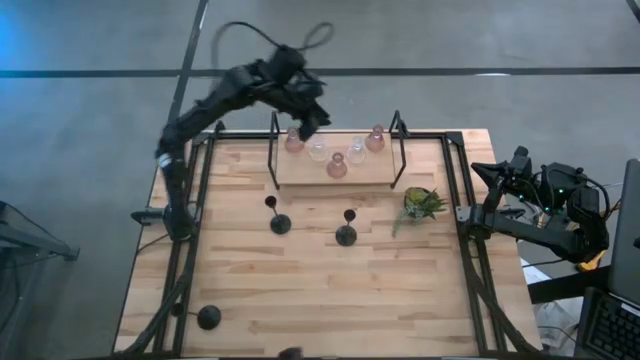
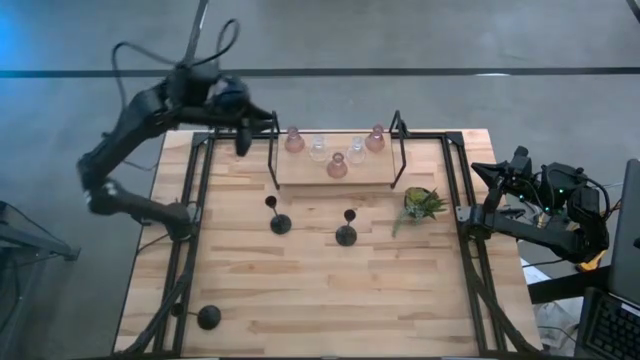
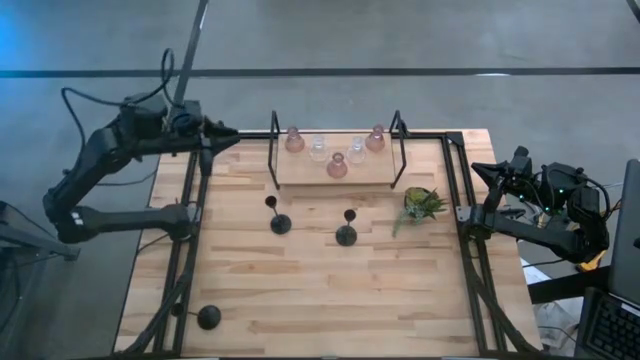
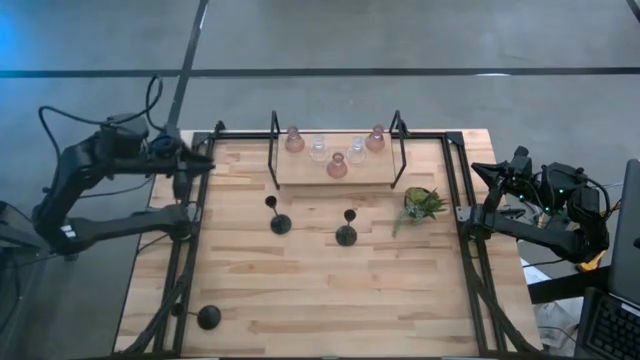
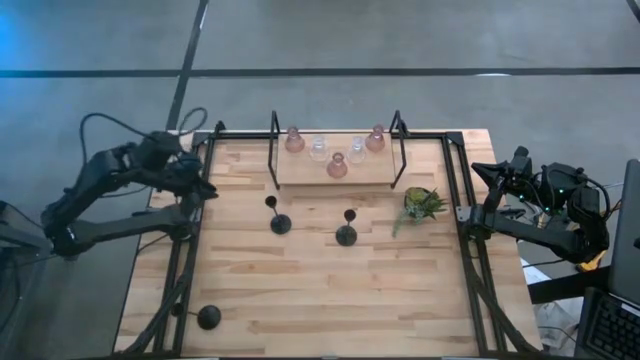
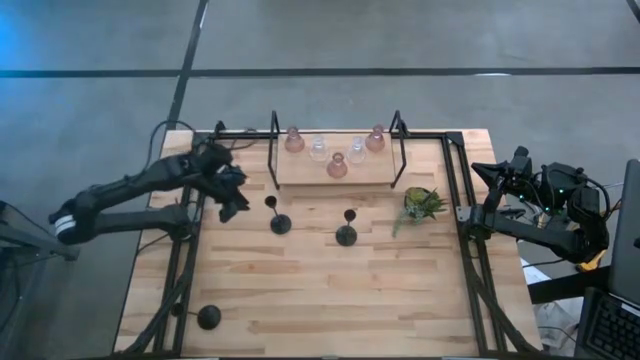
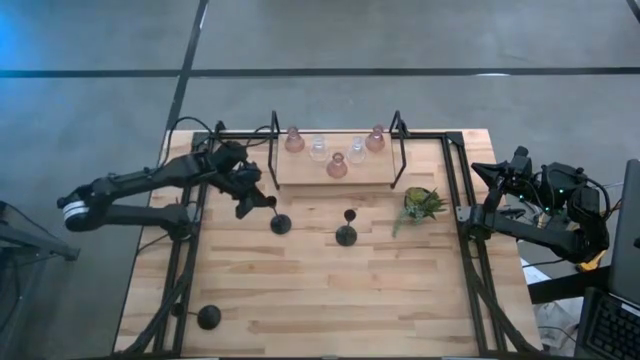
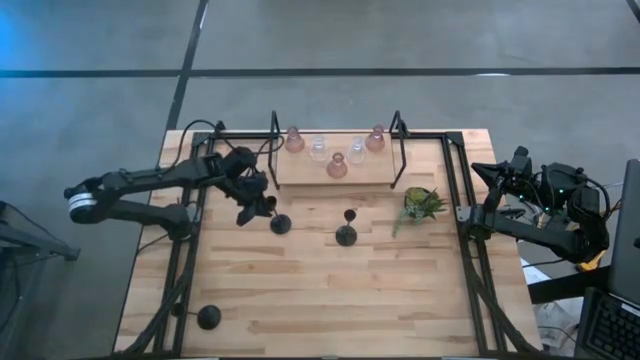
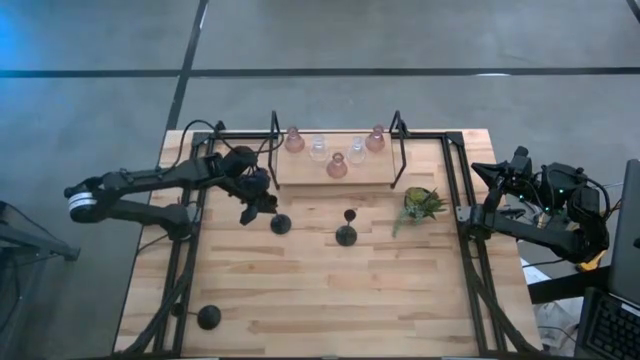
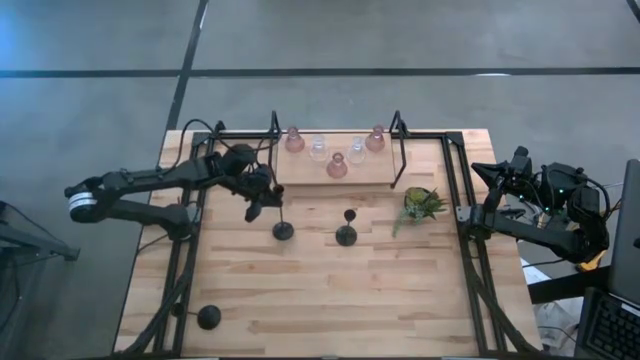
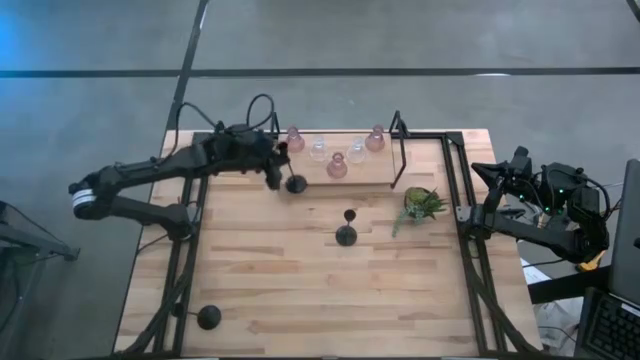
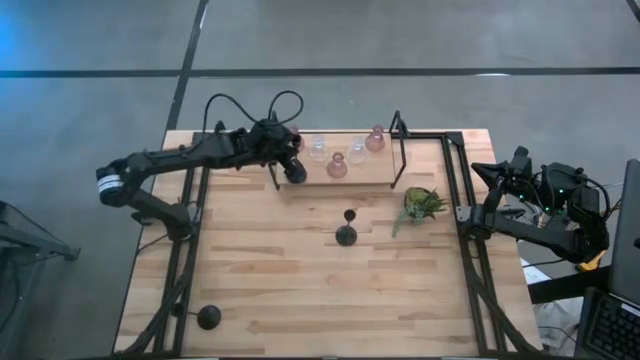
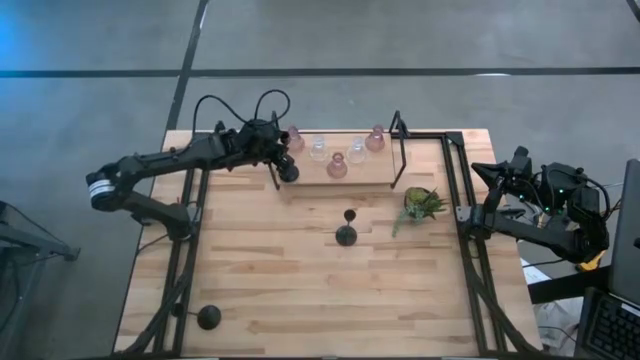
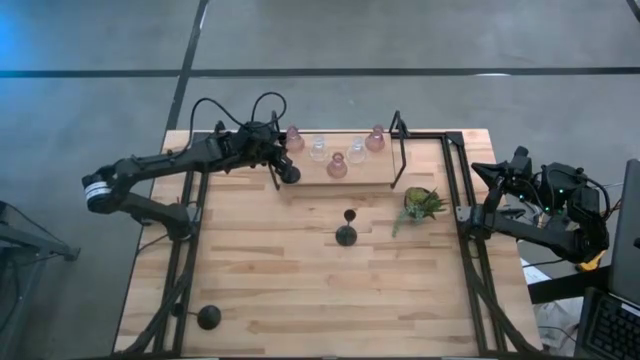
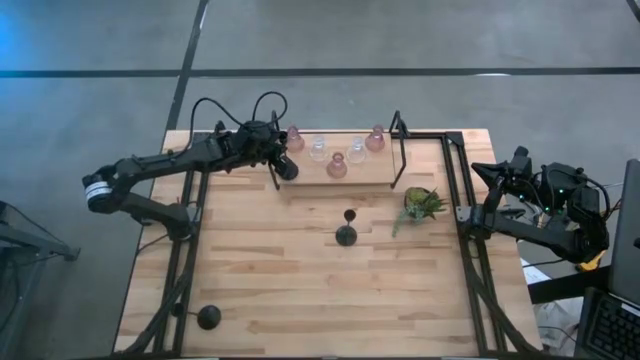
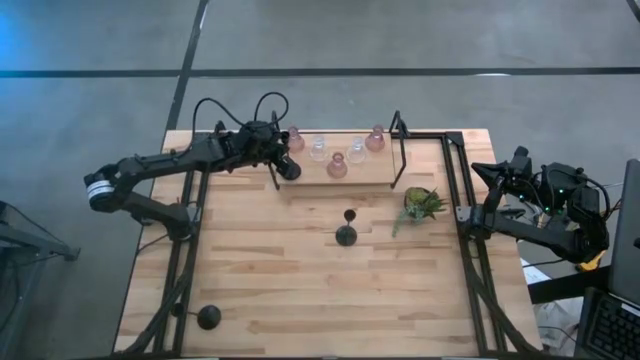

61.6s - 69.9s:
Task: Pick & Place candle stick holders
Put the top left black candle holder on the shelf aligned with the other pink candle holder

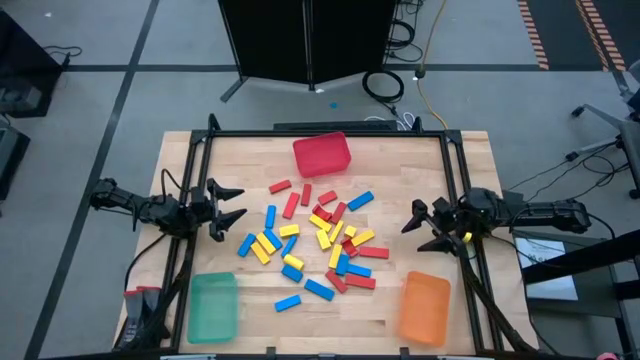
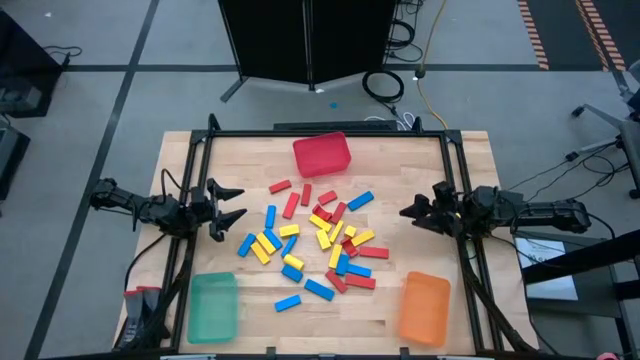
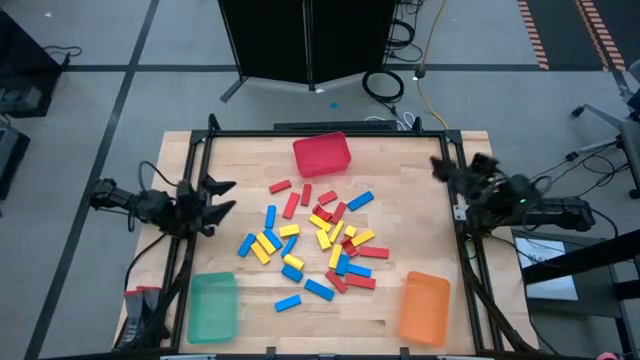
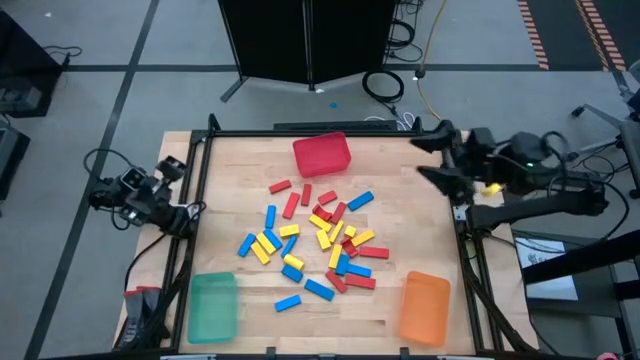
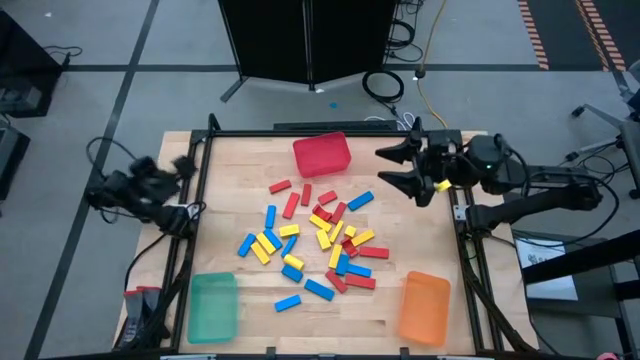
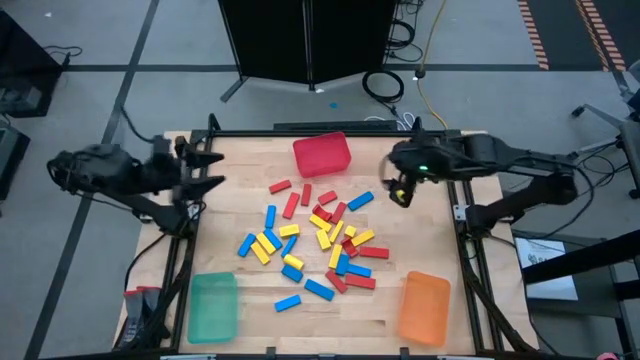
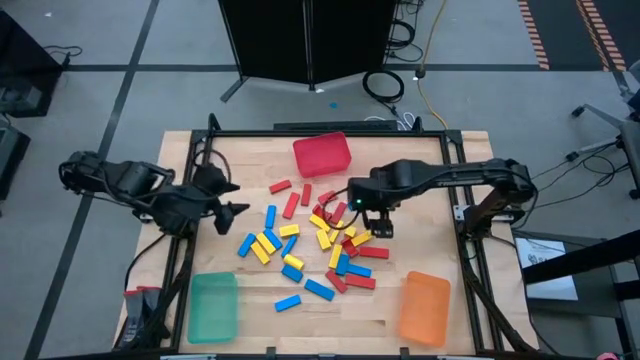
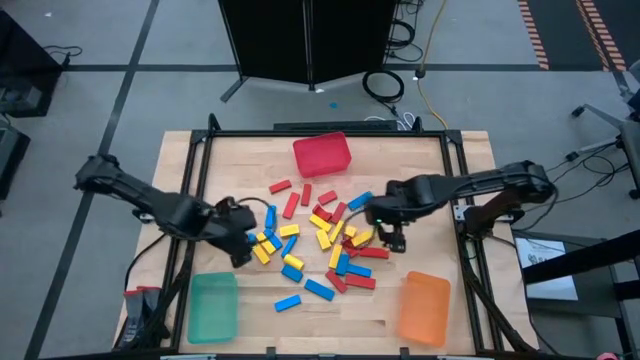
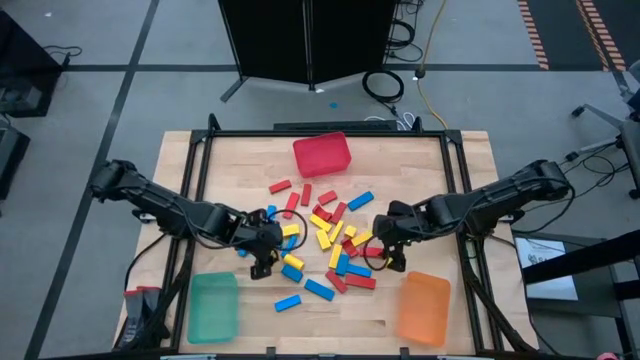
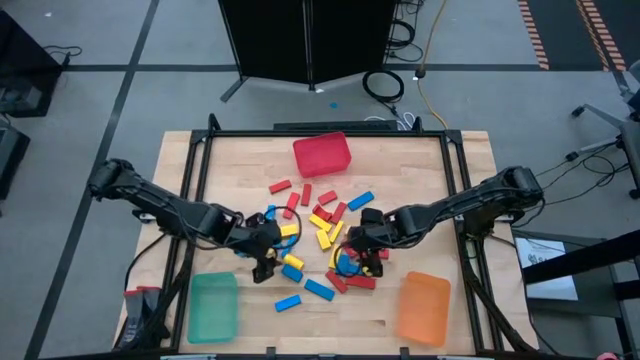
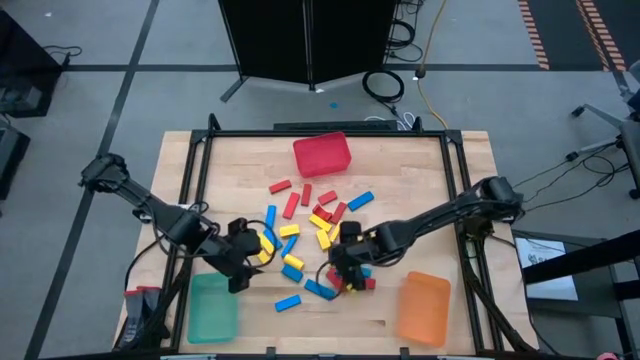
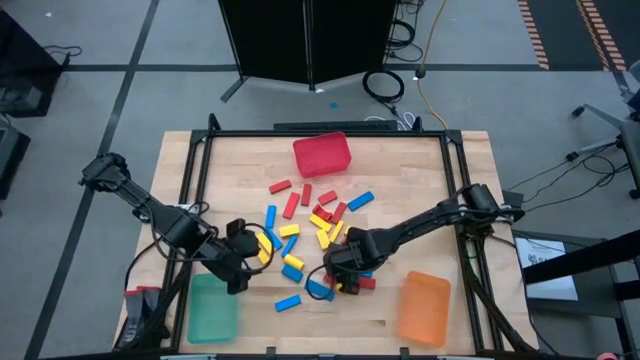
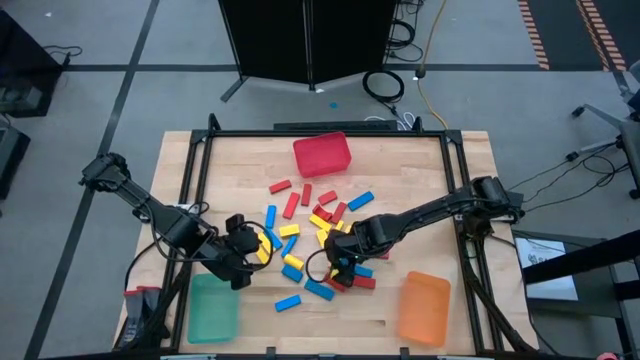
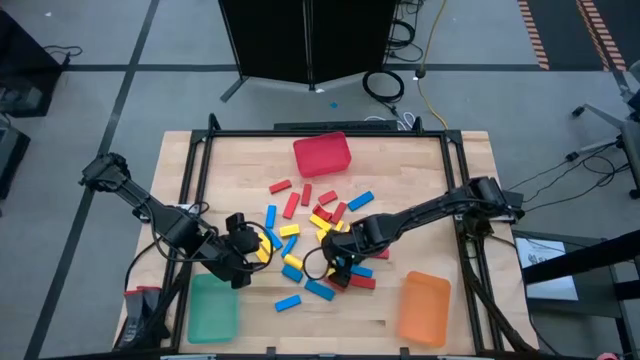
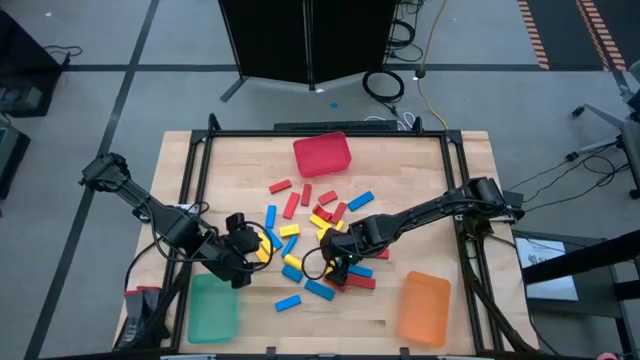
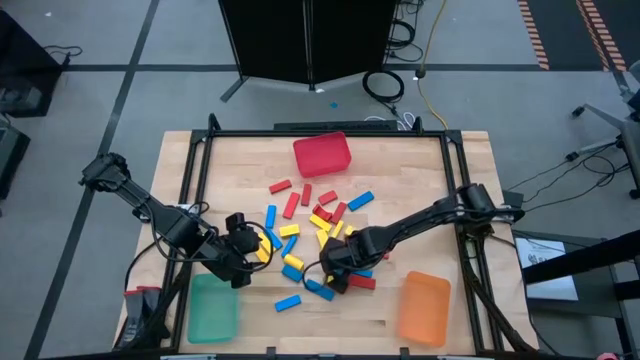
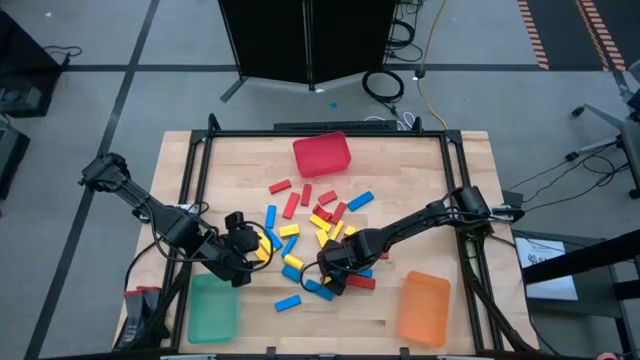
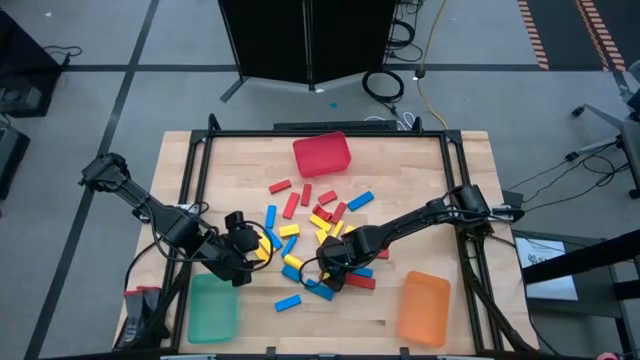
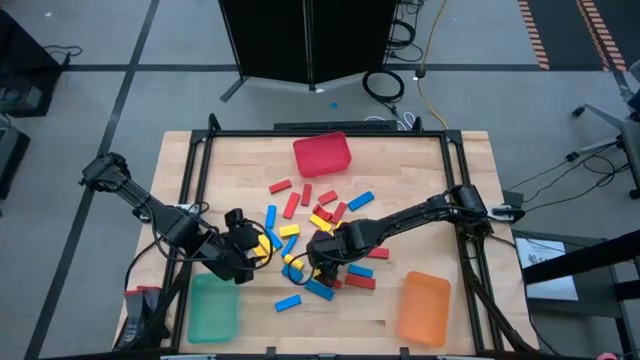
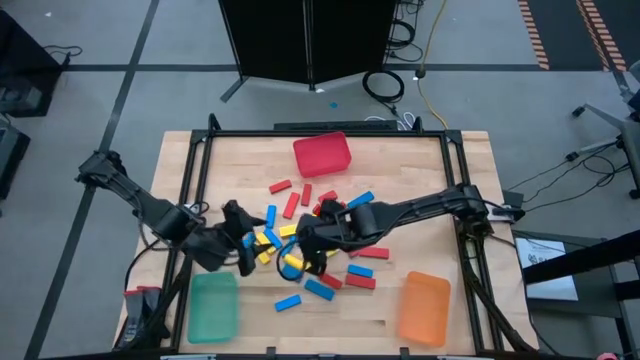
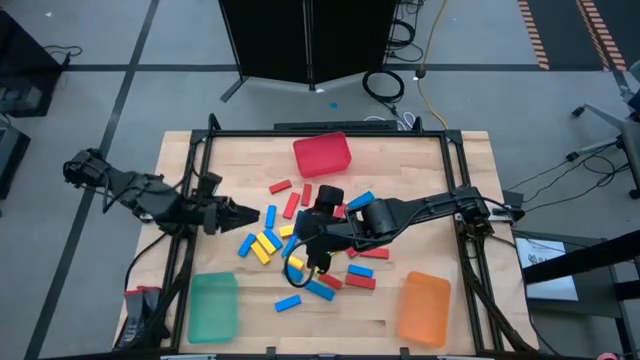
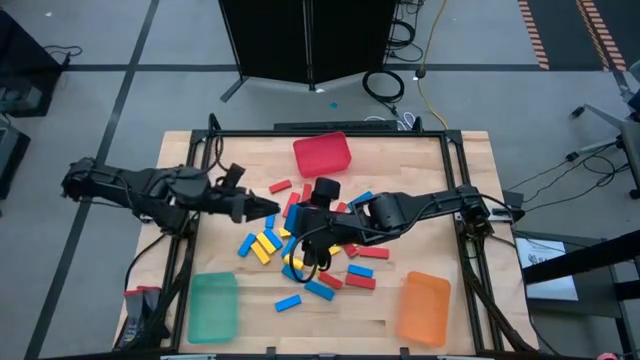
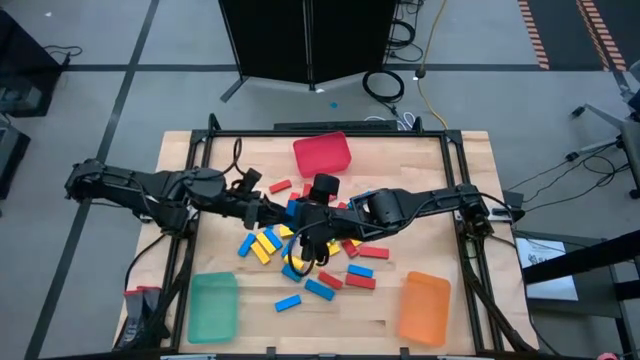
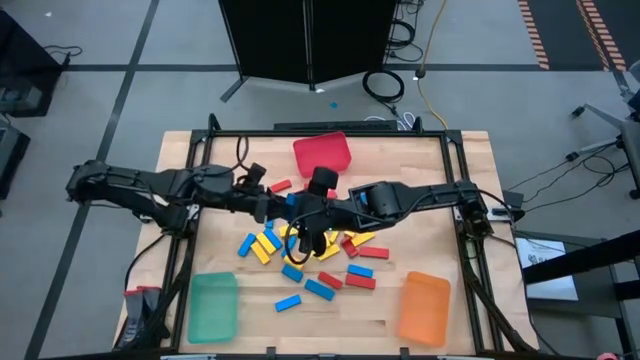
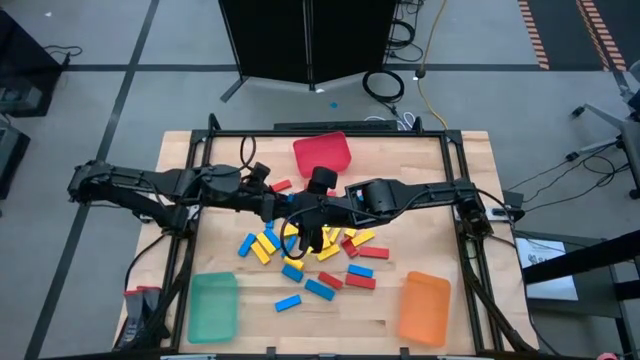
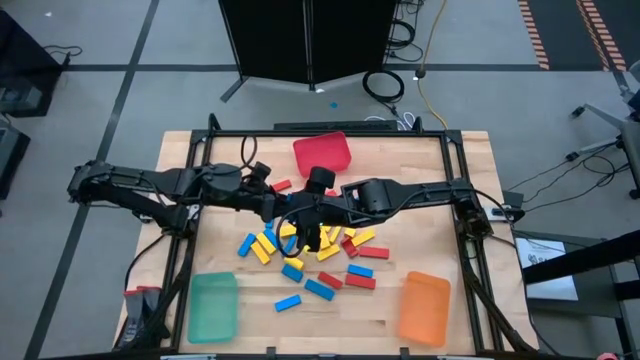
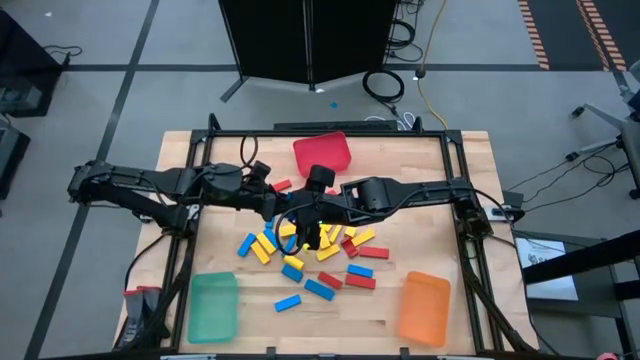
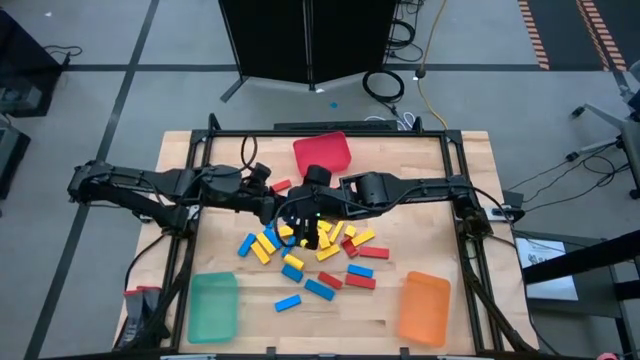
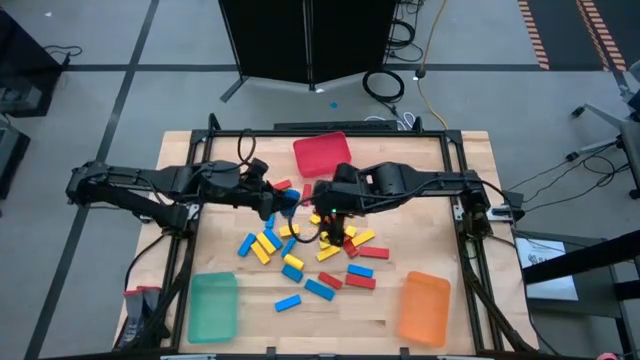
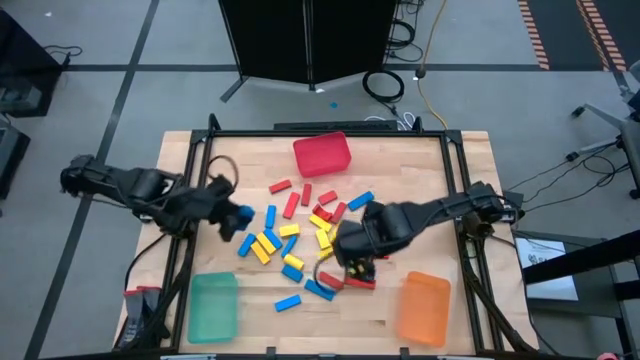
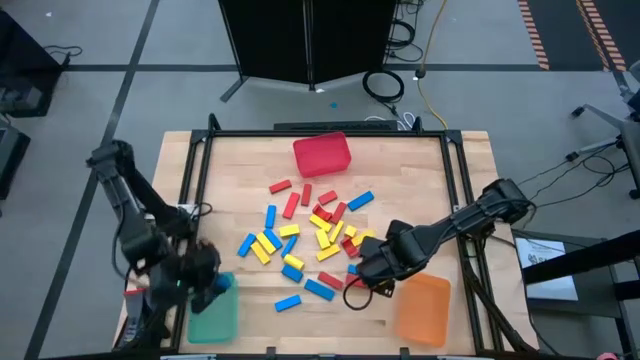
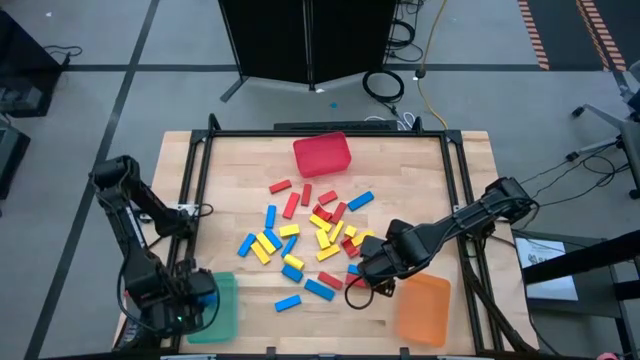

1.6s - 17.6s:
Task: Sort blocks
Put the blue block into the green bin
